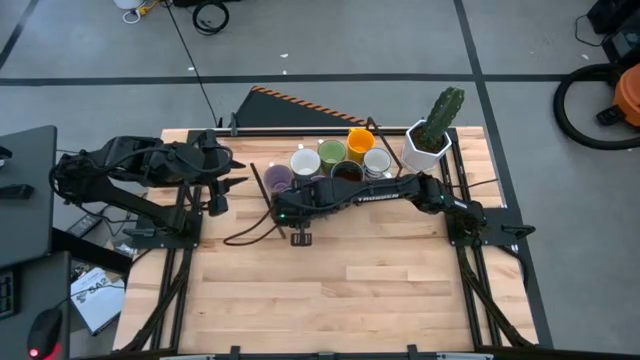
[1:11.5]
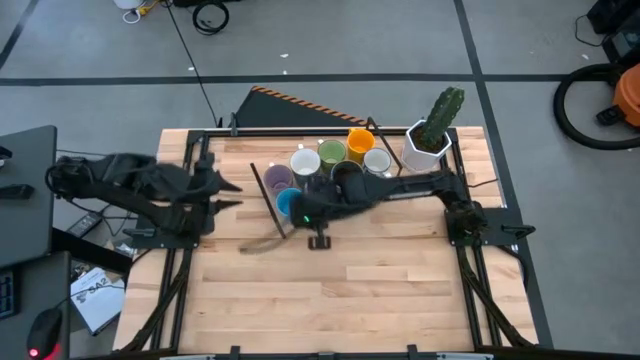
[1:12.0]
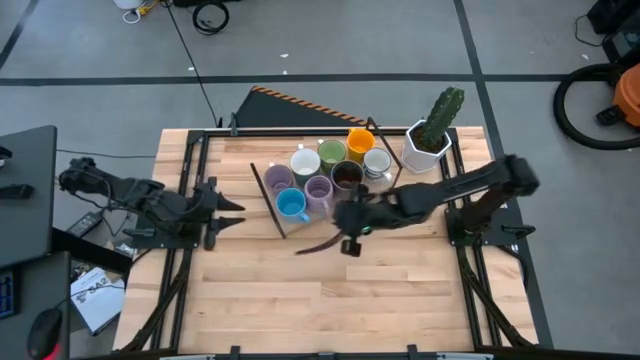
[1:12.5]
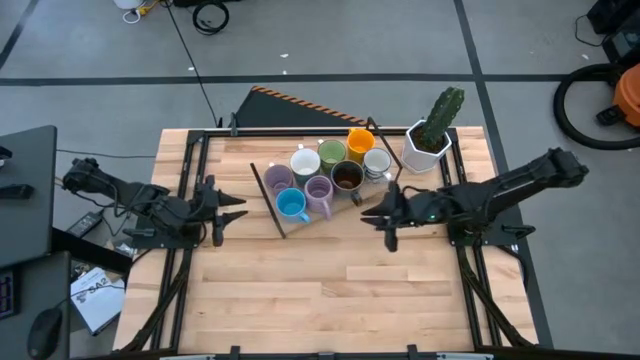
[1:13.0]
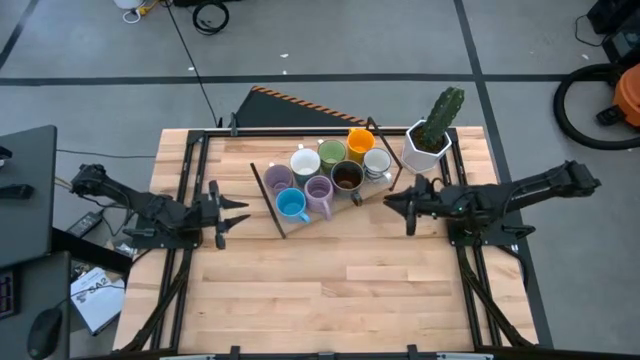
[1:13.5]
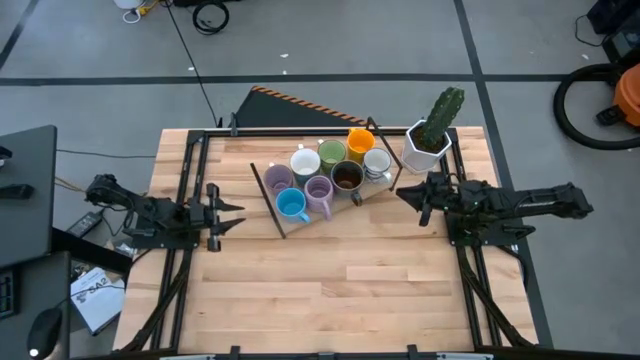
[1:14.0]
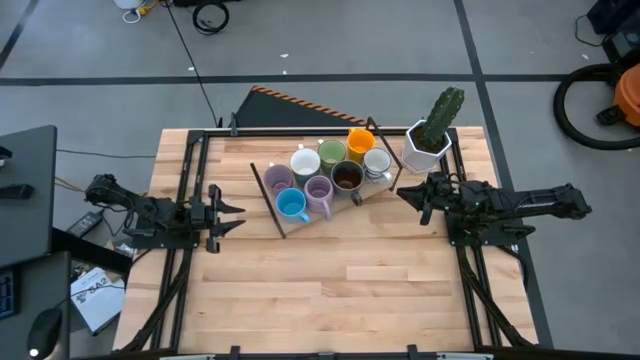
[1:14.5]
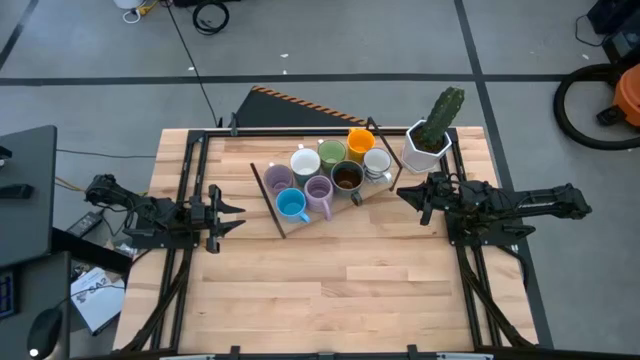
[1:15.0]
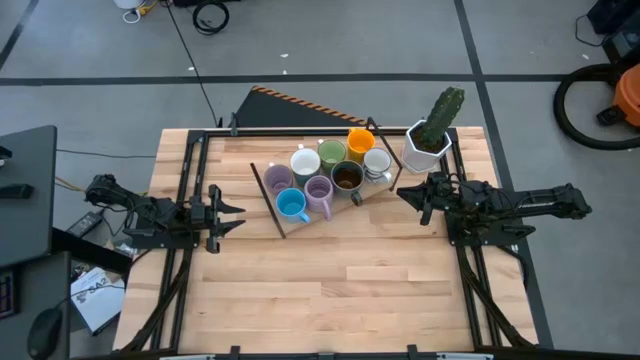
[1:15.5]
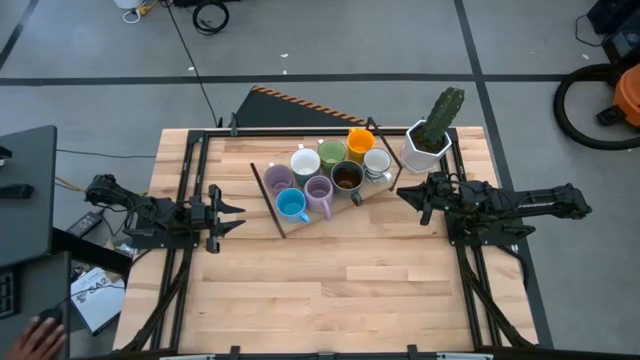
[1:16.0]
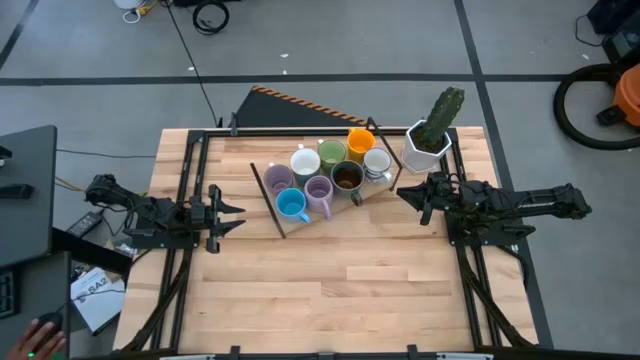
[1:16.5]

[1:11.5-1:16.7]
Task: Place coffee mugs
Return to Home Position

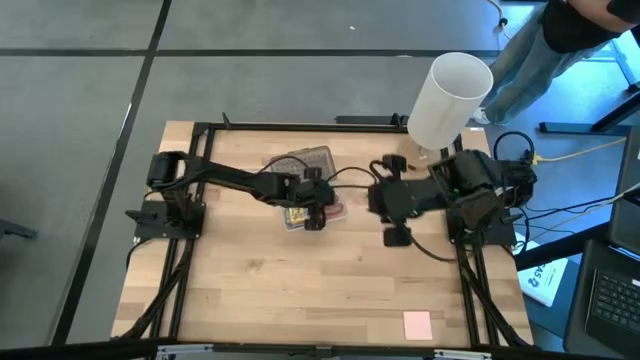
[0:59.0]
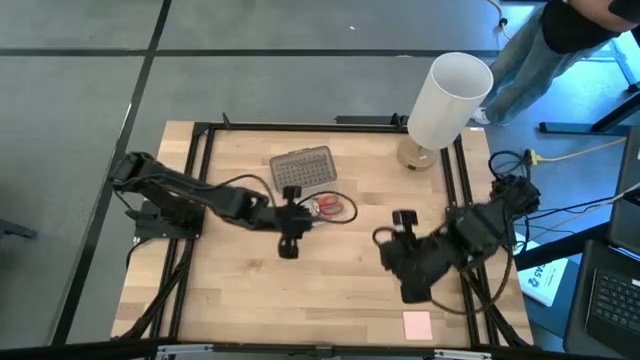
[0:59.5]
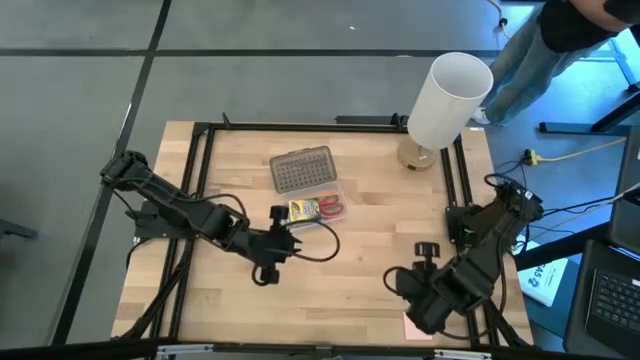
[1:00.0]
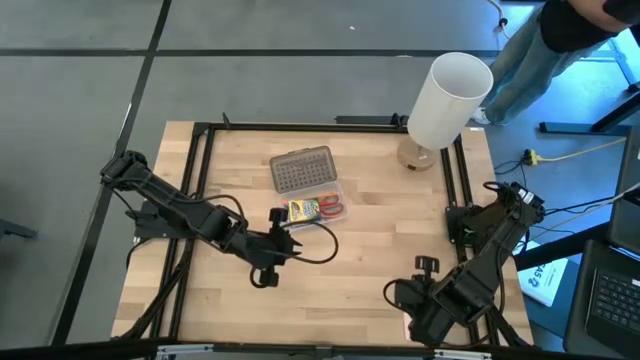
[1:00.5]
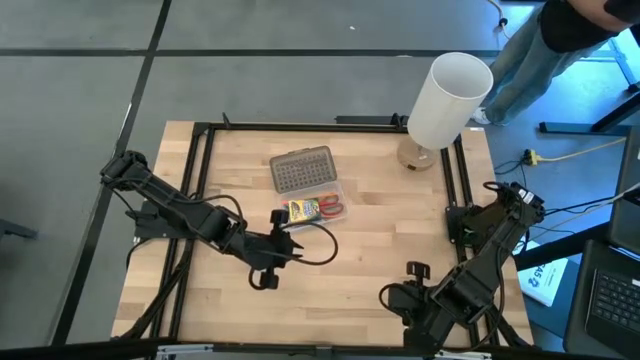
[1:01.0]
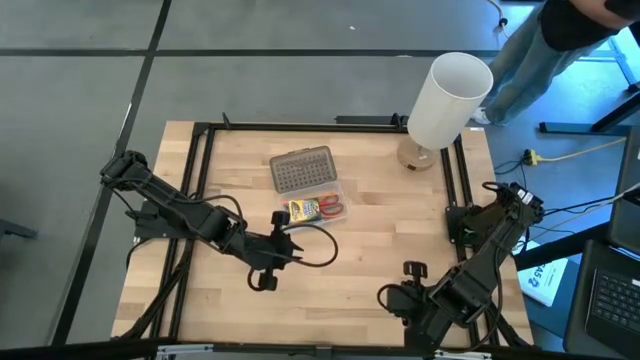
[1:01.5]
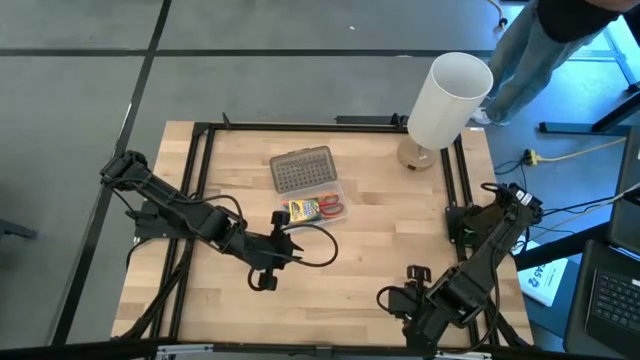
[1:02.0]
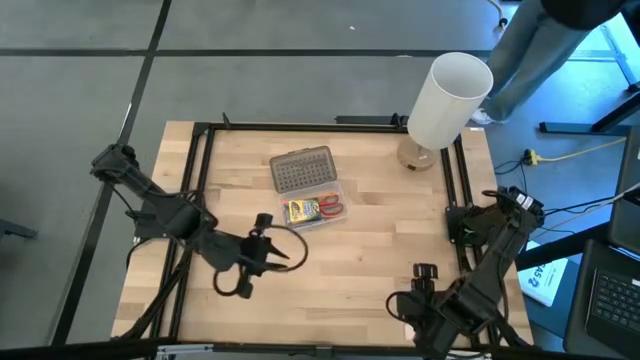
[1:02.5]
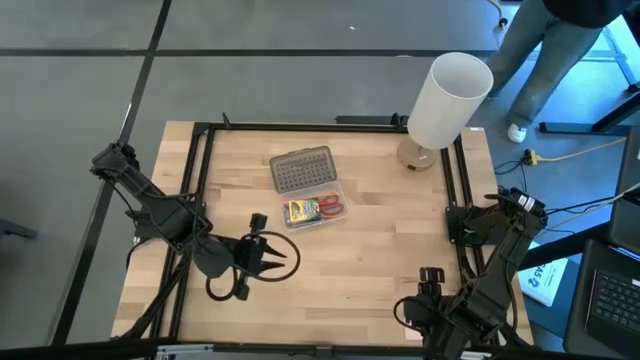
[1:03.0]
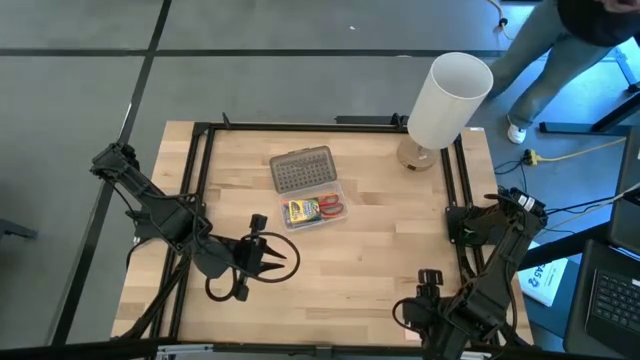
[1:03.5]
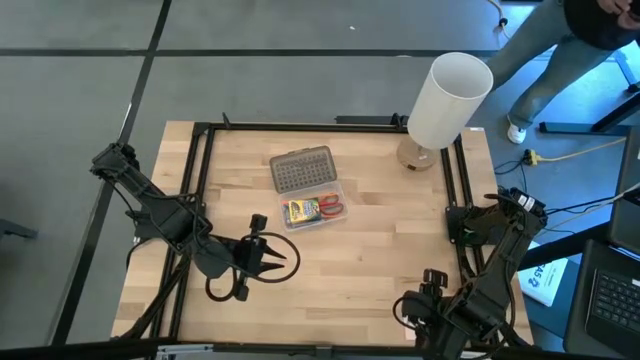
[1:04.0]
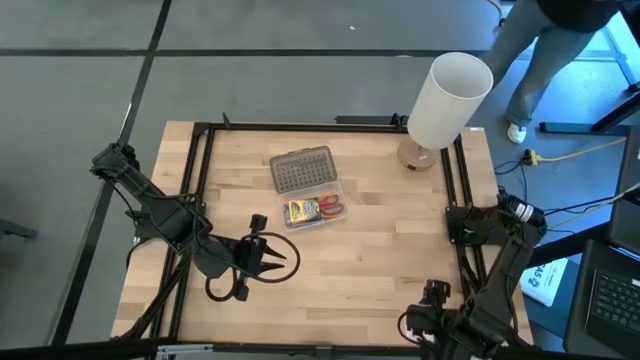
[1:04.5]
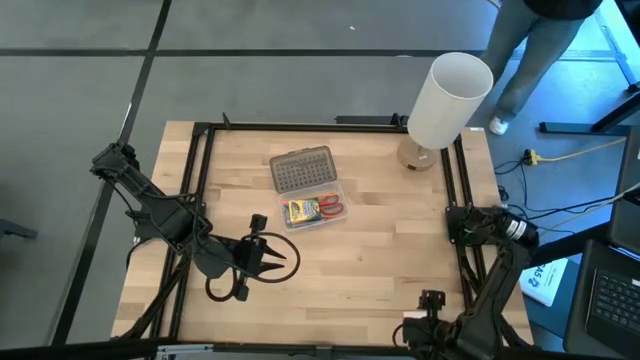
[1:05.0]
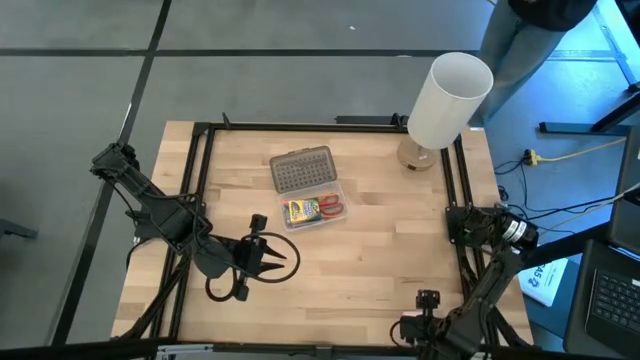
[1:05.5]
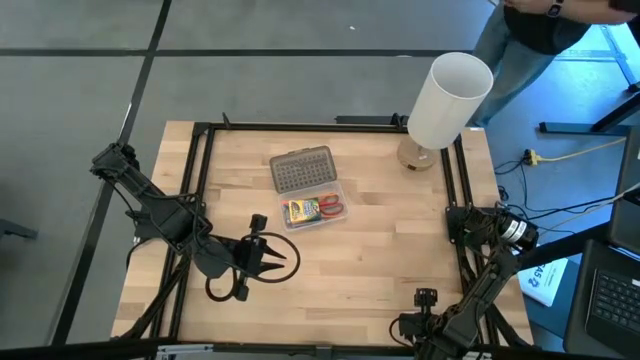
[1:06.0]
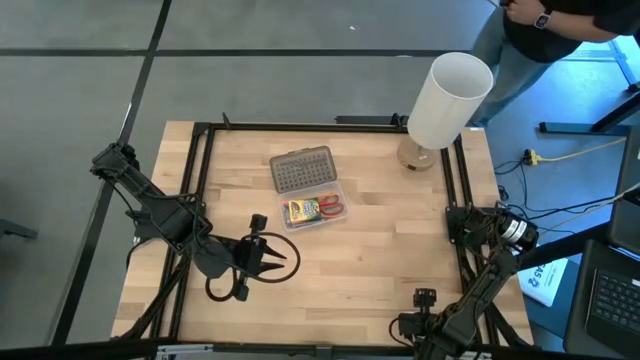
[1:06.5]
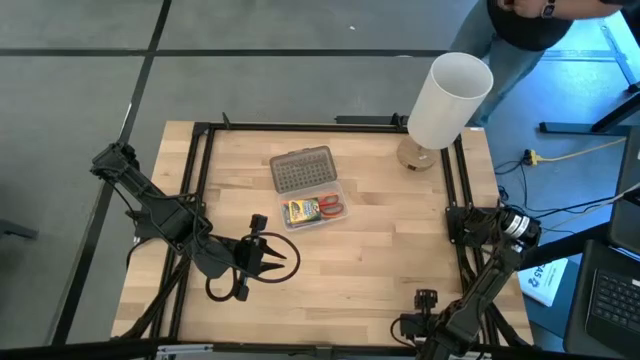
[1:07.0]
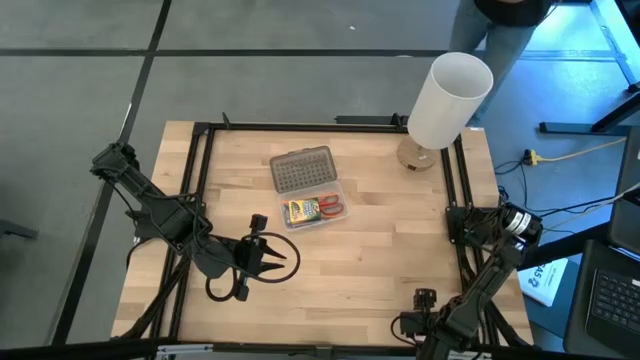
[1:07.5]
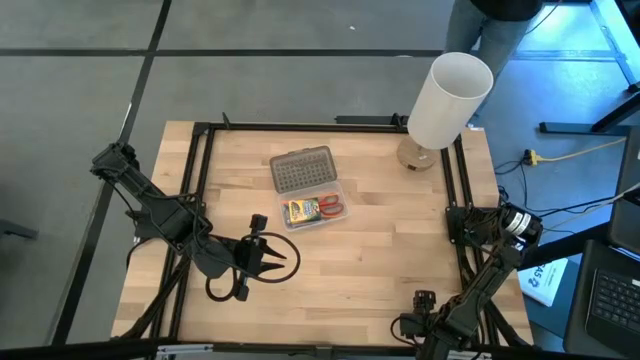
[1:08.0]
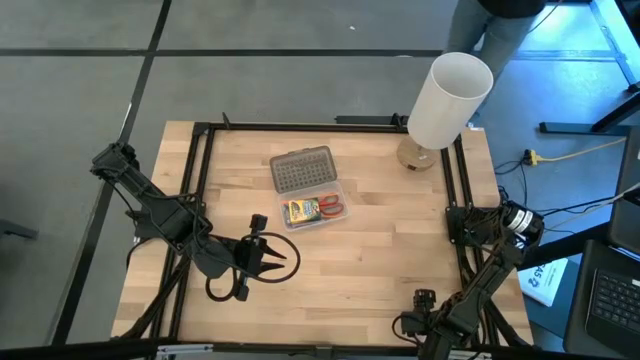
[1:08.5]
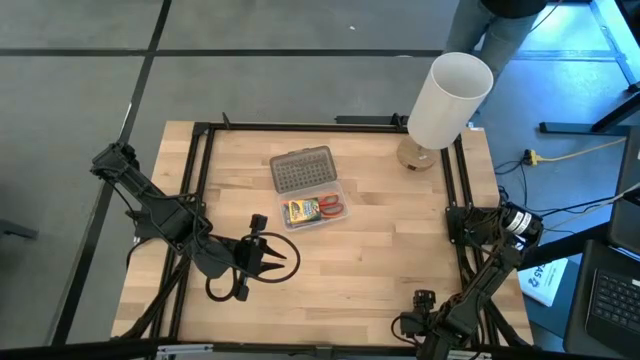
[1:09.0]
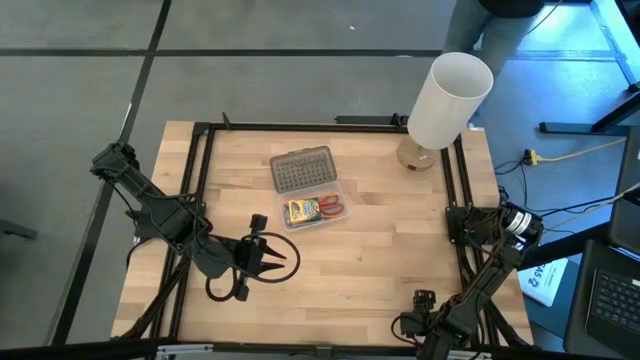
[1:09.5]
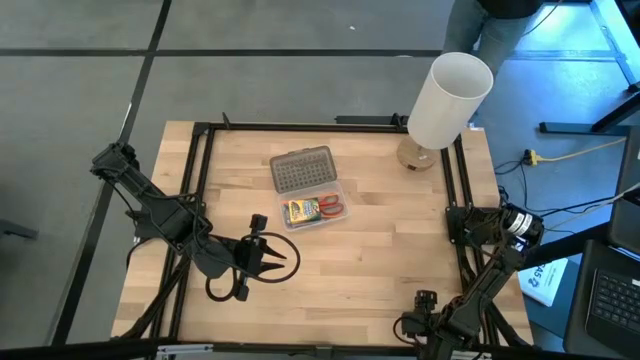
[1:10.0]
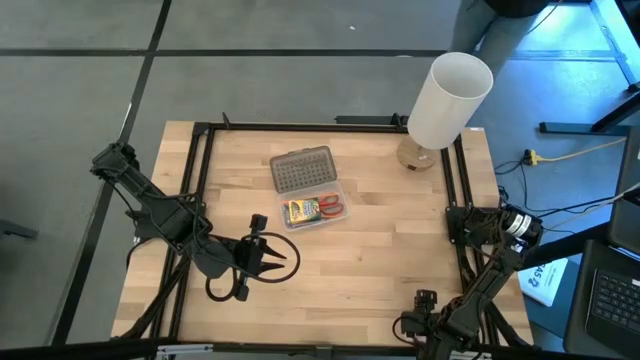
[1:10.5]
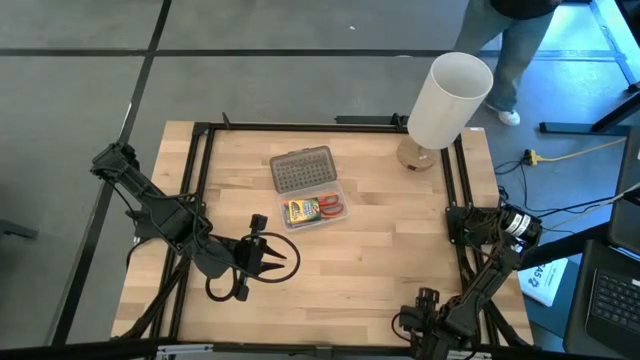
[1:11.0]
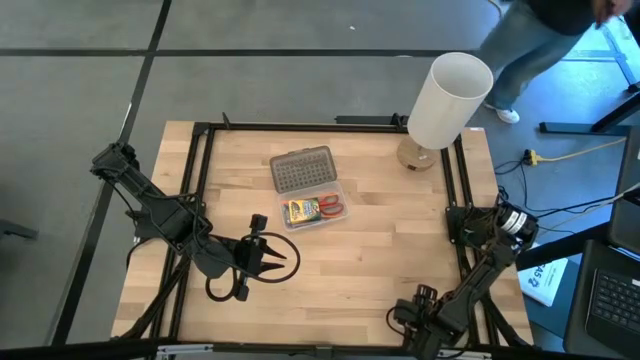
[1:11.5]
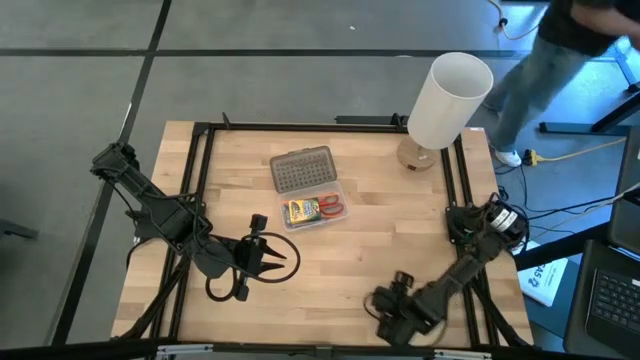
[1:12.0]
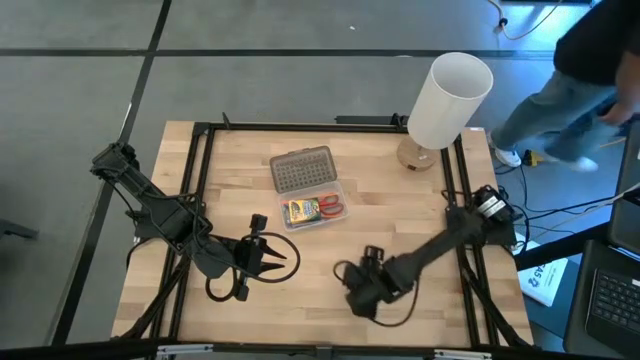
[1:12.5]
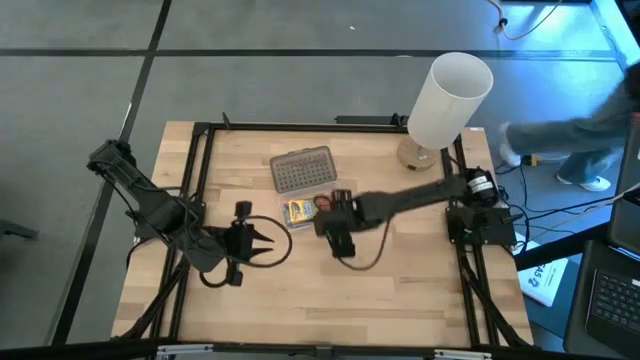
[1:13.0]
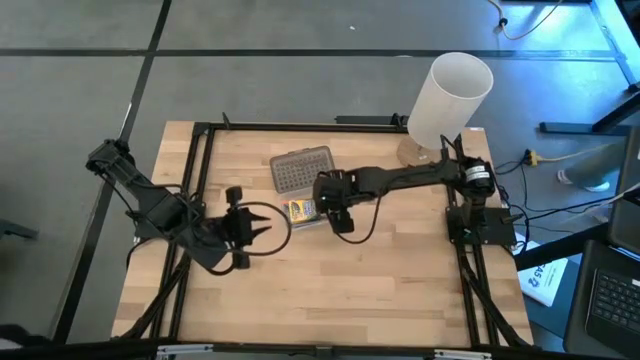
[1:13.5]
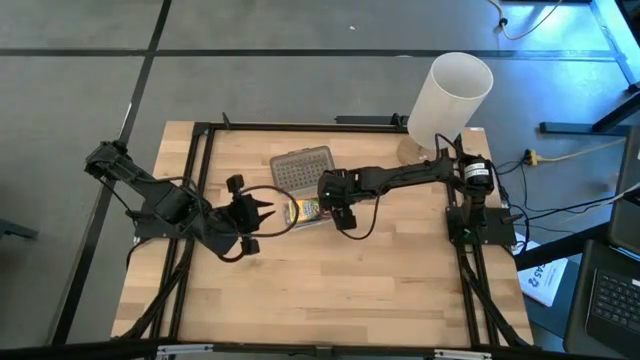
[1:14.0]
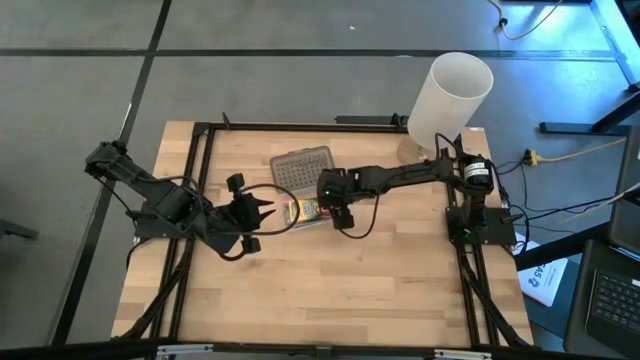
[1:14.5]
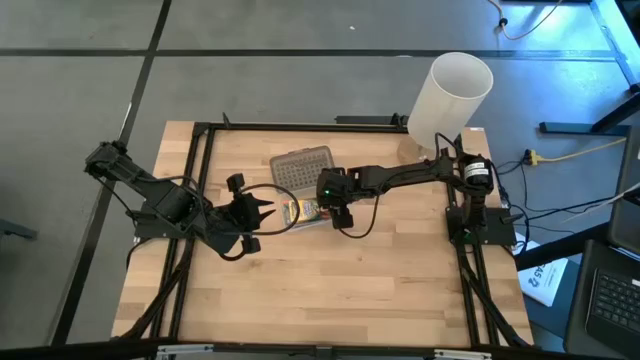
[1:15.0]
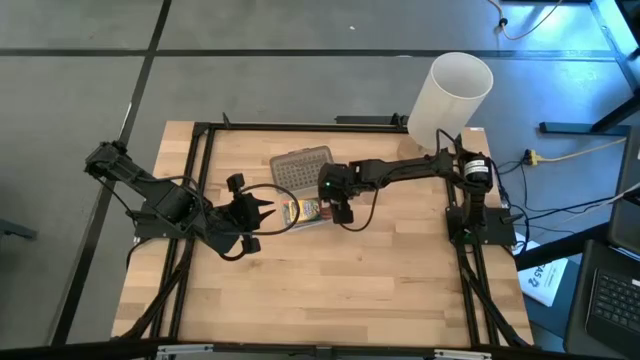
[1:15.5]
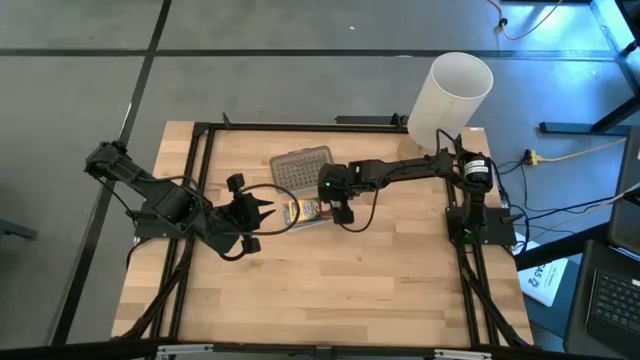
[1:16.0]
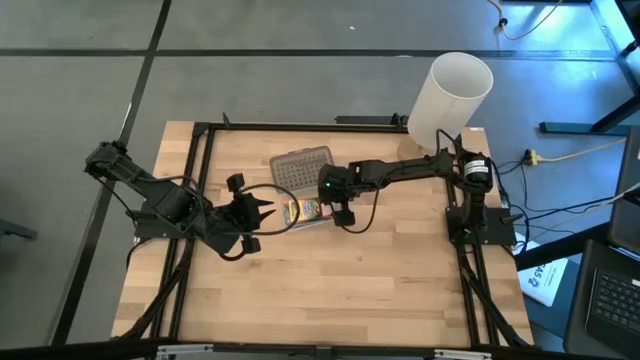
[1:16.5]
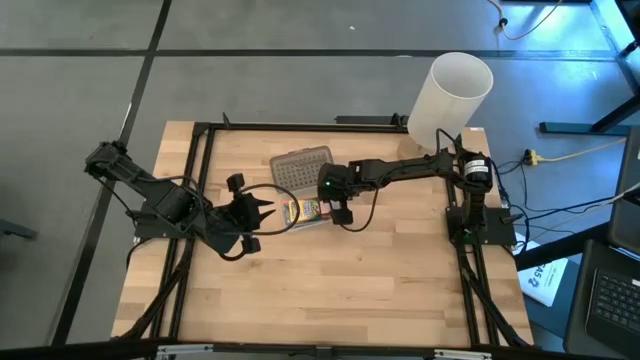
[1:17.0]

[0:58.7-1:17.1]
Task: Pack school essentials
Put the pink sticky note into the black supply box
